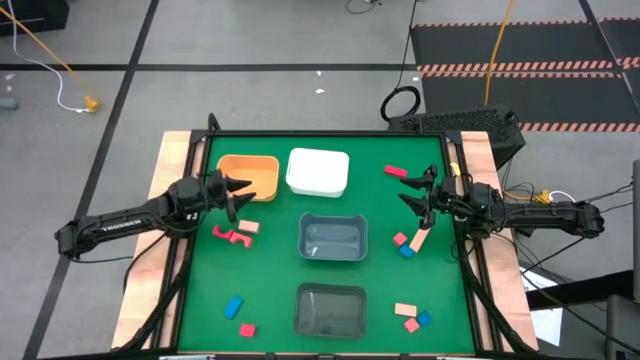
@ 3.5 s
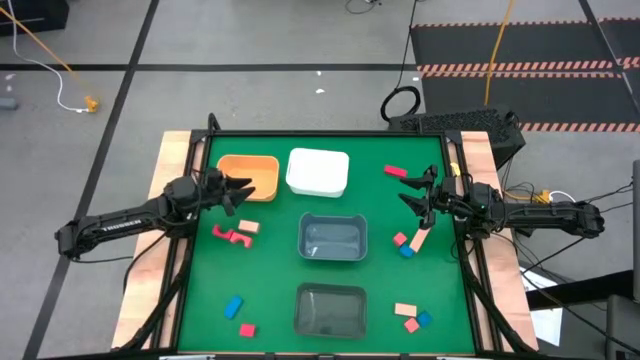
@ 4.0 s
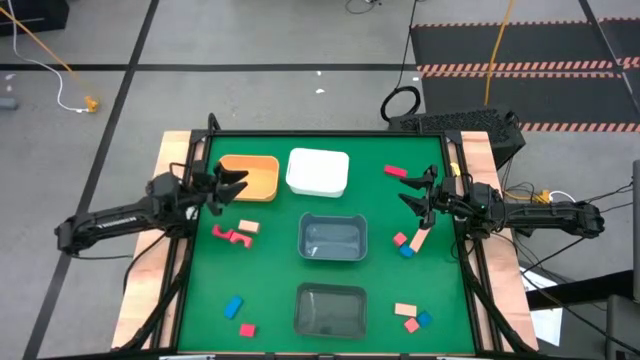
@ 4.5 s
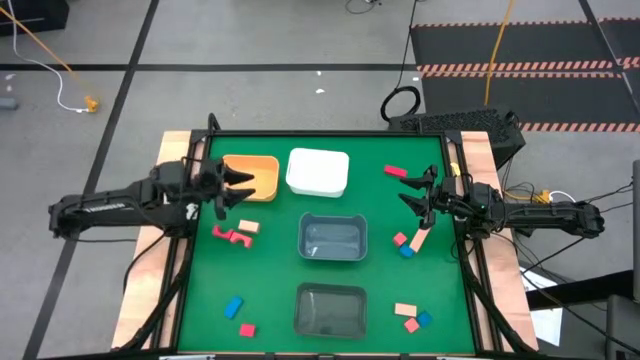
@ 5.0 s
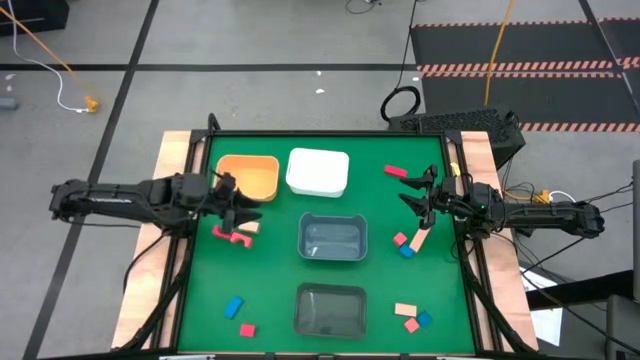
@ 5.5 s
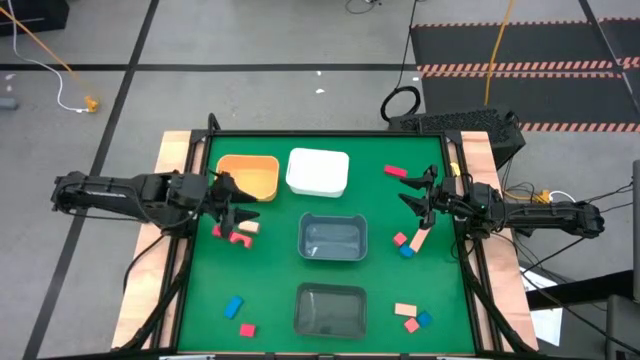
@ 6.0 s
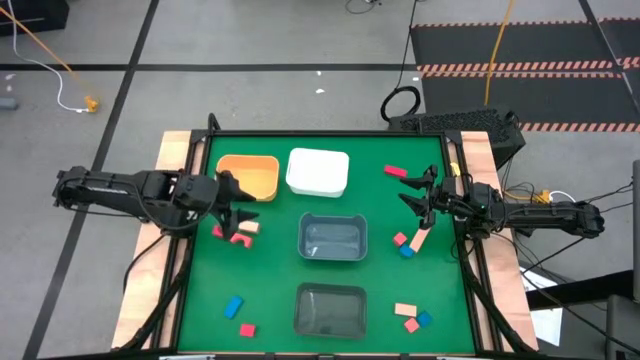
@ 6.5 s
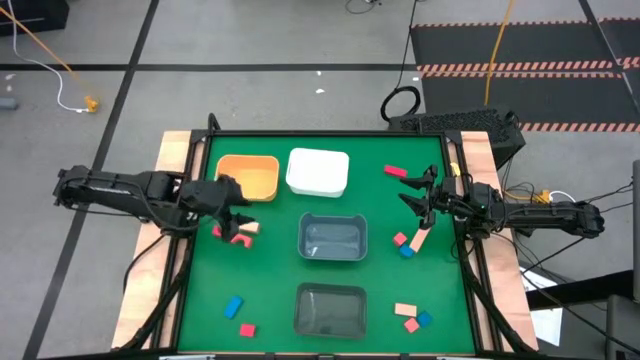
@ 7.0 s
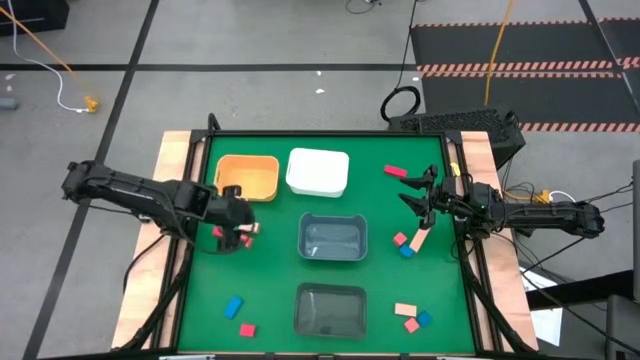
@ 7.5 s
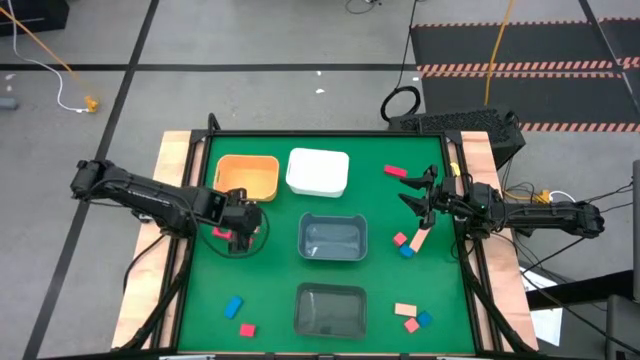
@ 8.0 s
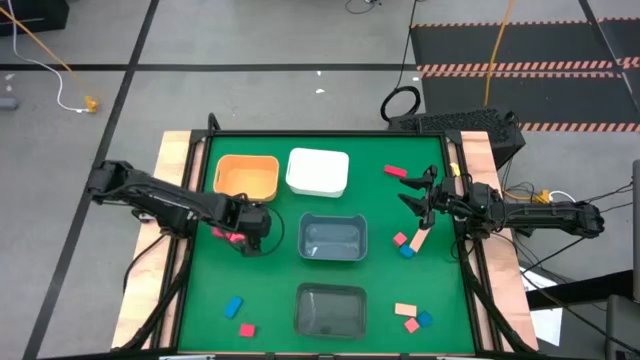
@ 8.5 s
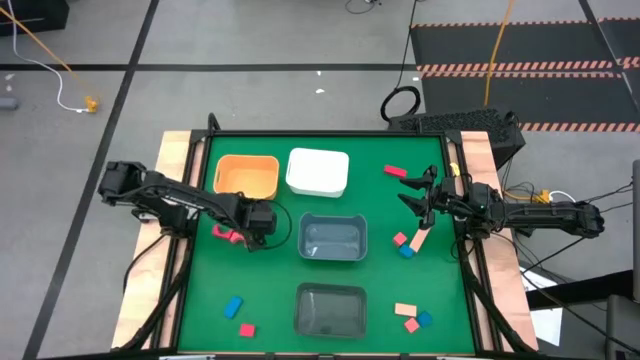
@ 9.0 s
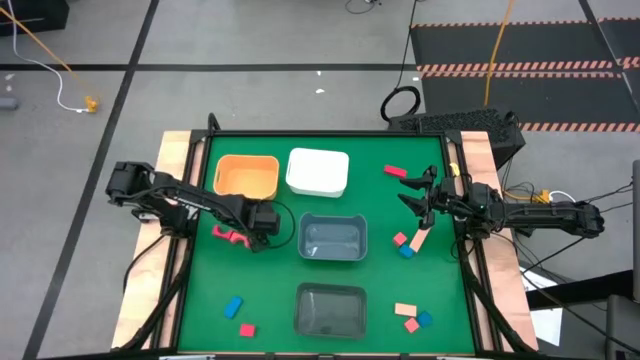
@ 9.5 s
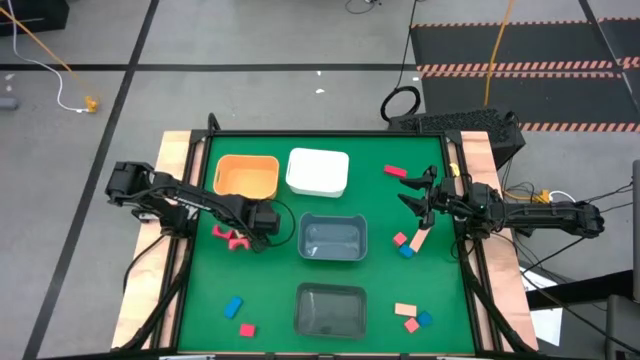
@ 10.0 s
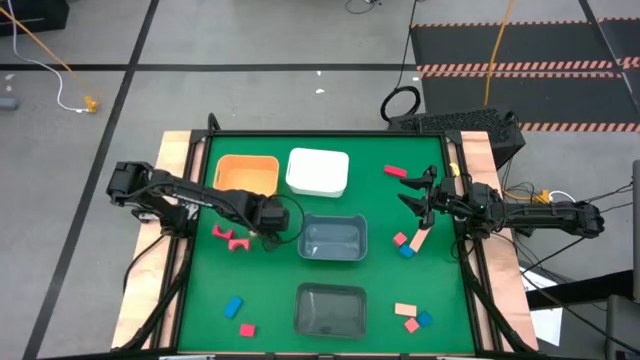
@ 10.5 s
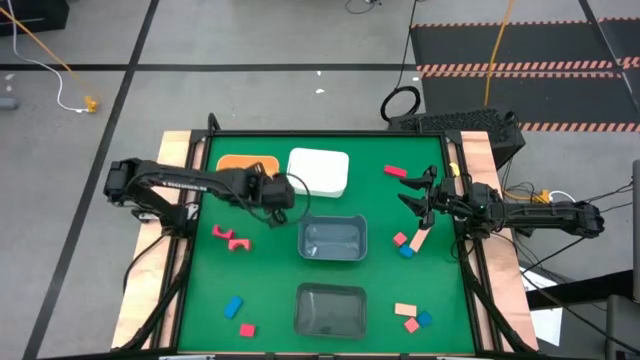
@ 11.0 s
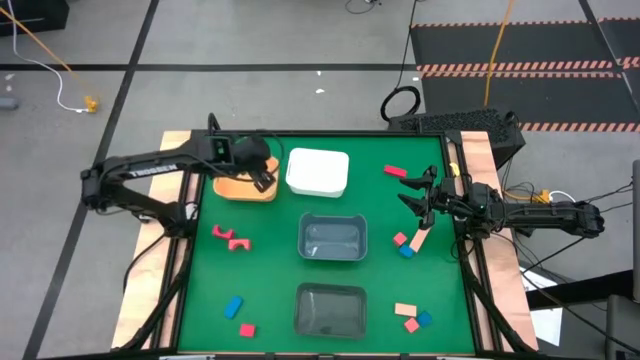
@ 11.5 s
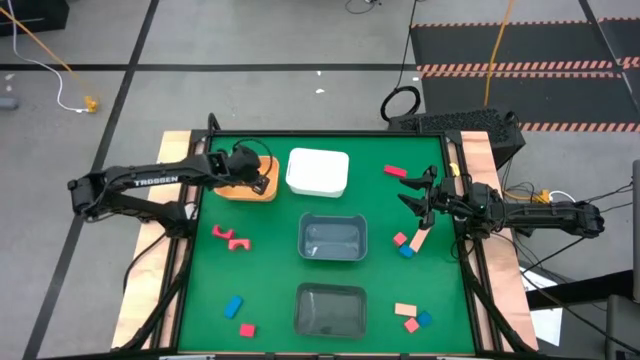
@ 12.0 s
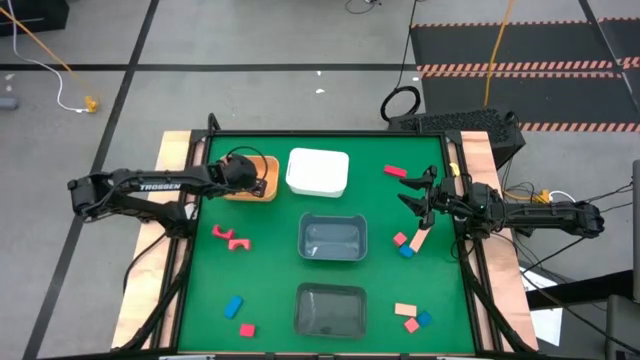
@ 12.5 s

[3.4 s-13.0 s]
Task: Sort & place blocks by color
Put the top left brown wooden block into the yellow bin

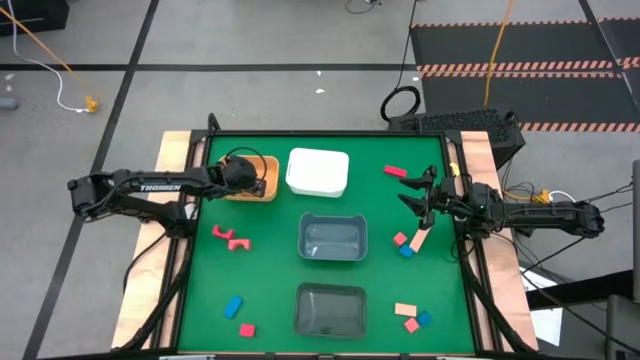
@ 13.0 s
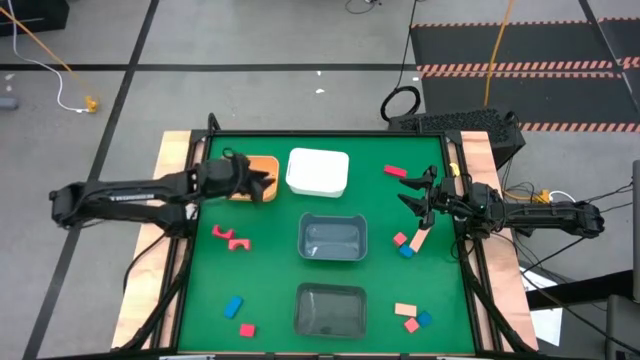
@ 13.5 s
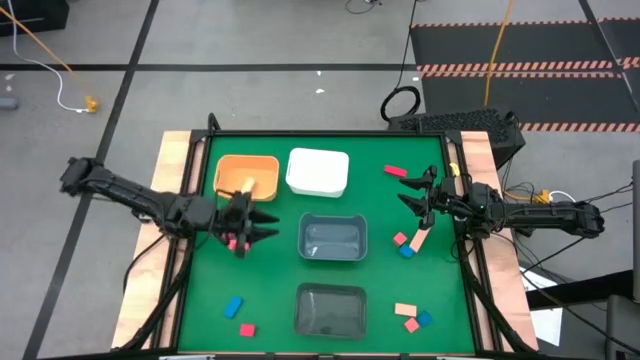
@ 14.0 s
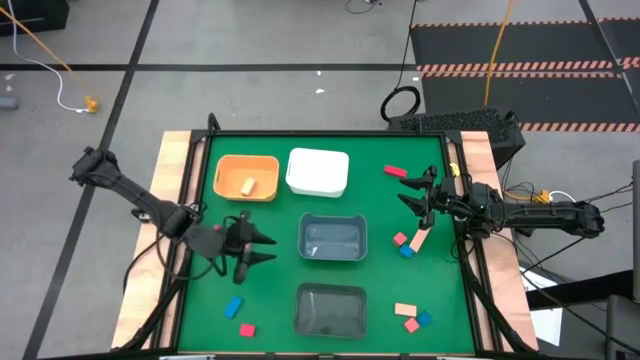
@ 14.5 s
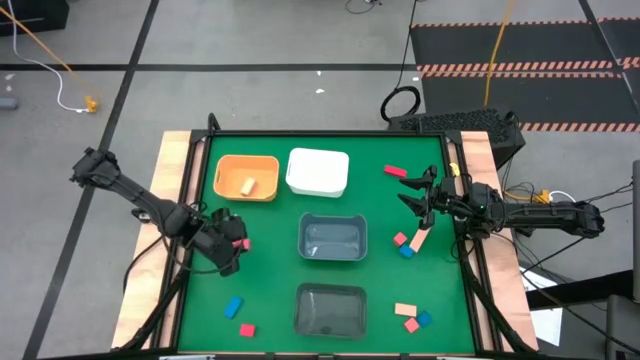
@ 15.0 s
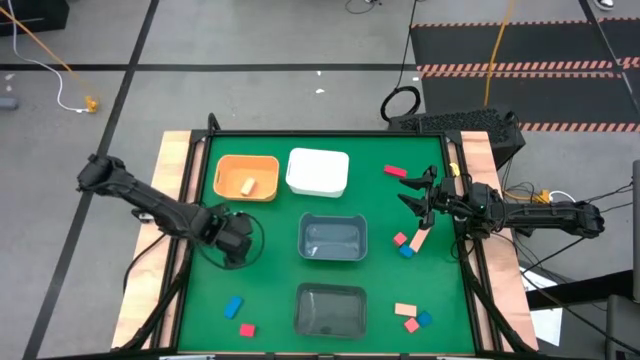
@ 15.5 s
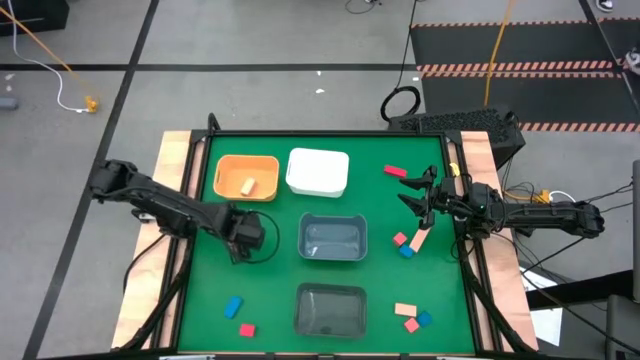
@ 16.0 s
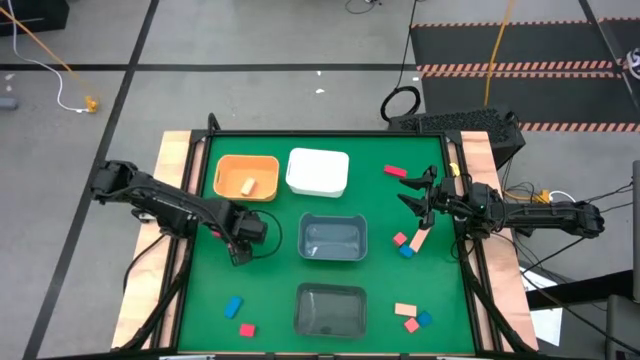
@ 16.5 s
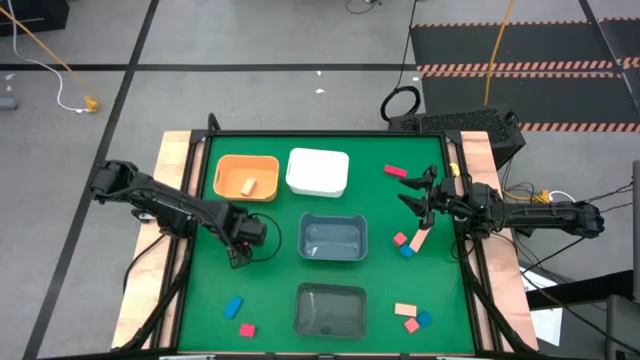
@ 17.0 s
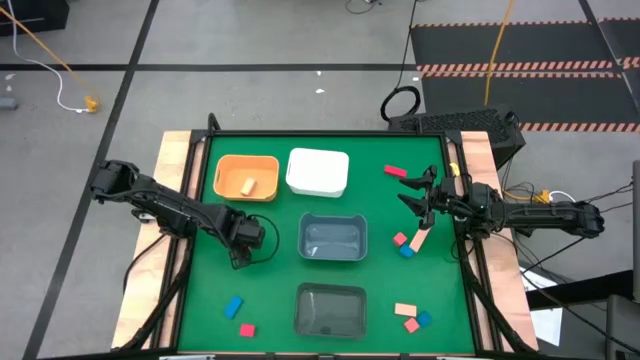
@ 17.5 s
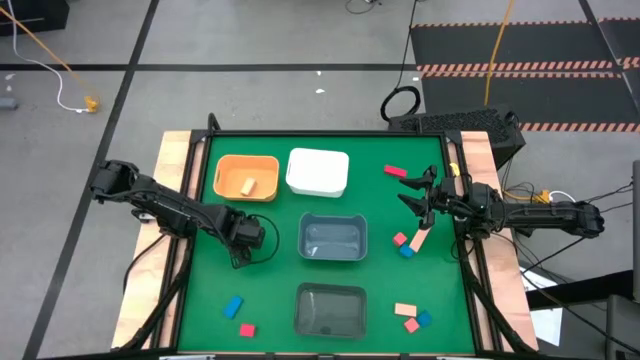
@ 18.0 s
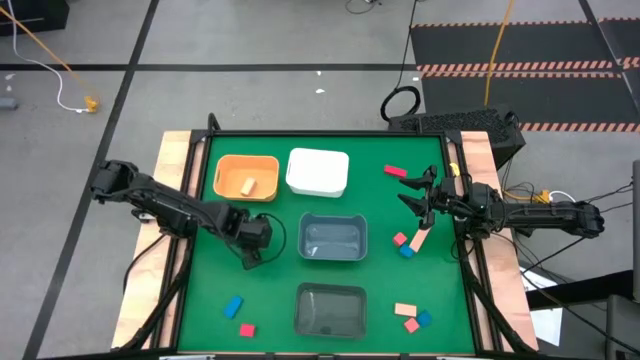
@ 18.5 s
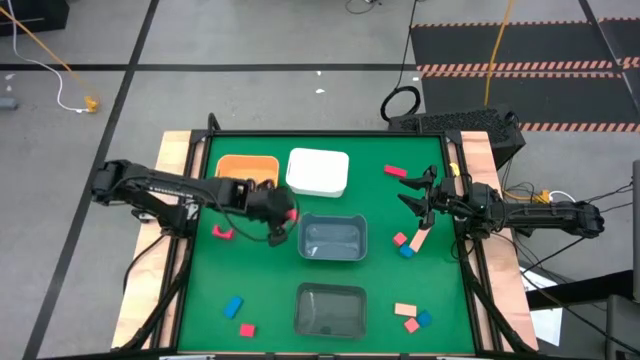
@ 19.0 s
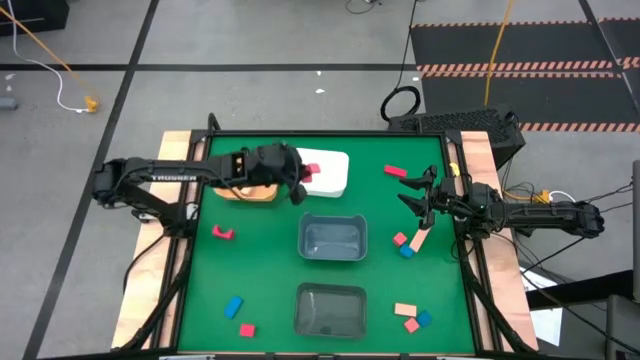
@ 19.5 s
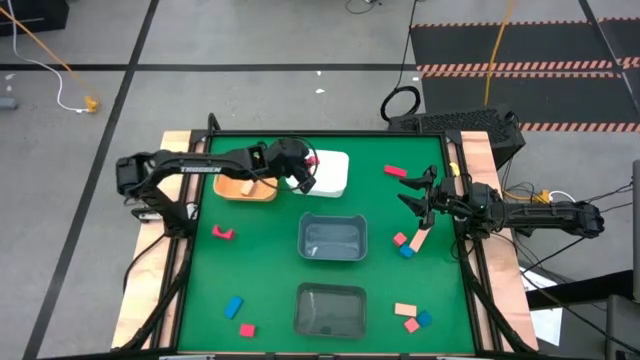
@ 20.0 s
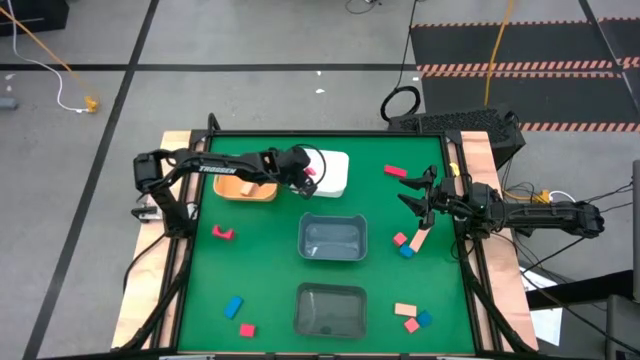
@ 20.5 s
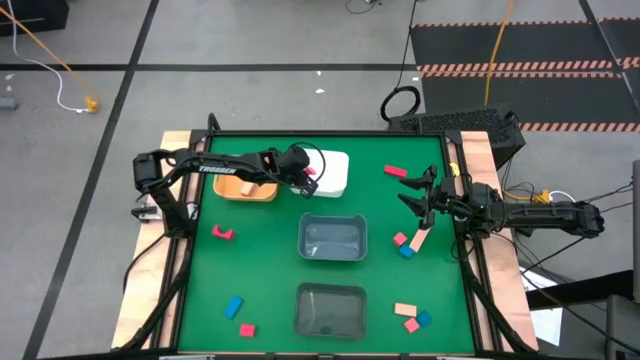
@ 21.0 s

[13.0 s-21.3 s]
Put the top left orange wooden block into the white bin

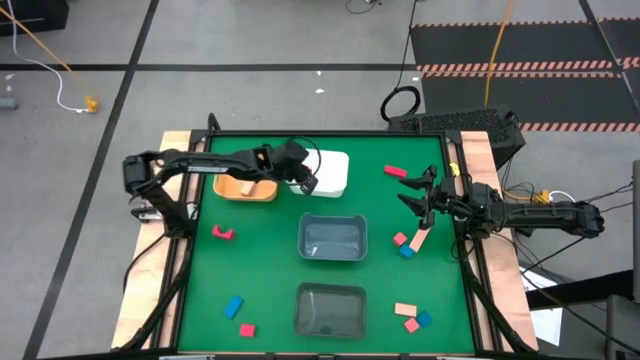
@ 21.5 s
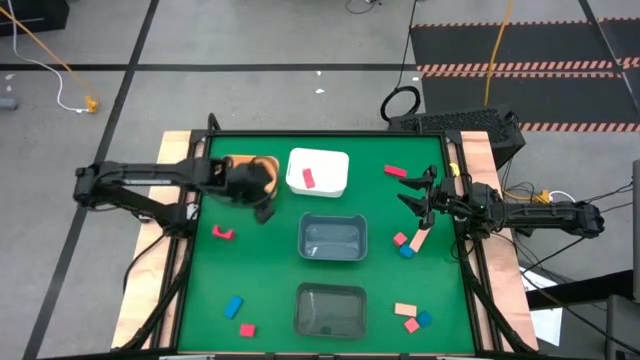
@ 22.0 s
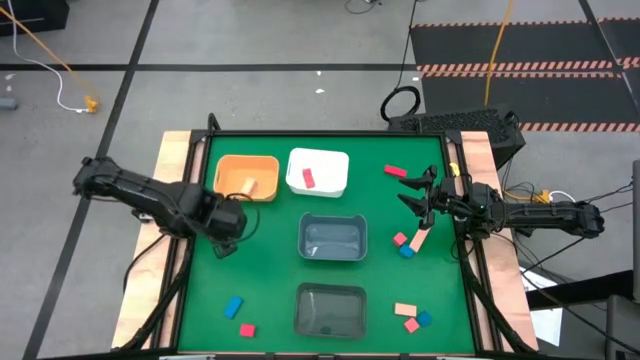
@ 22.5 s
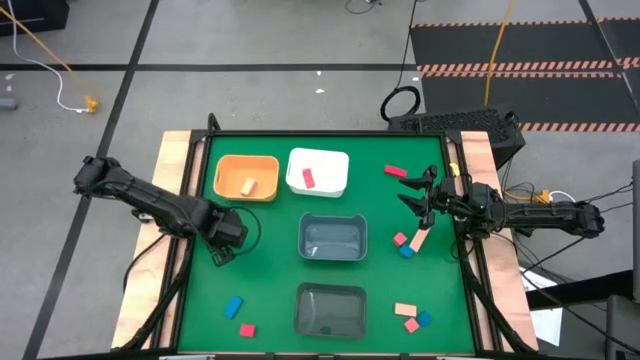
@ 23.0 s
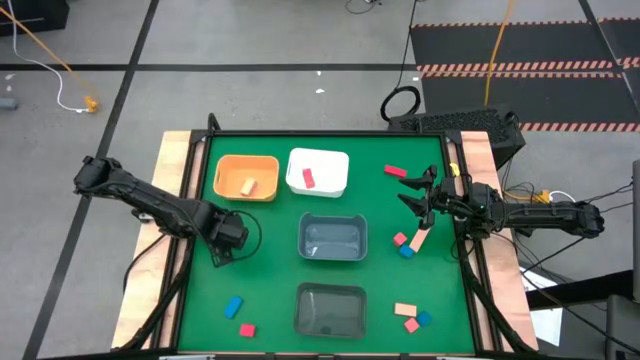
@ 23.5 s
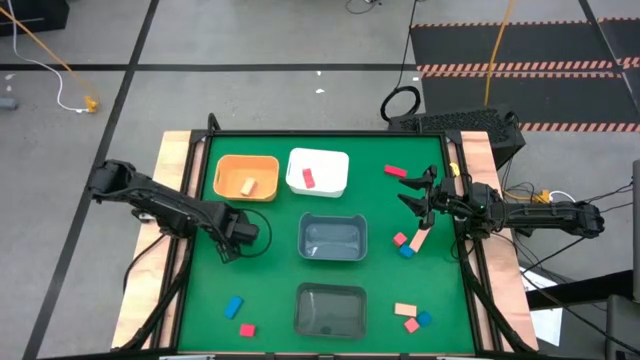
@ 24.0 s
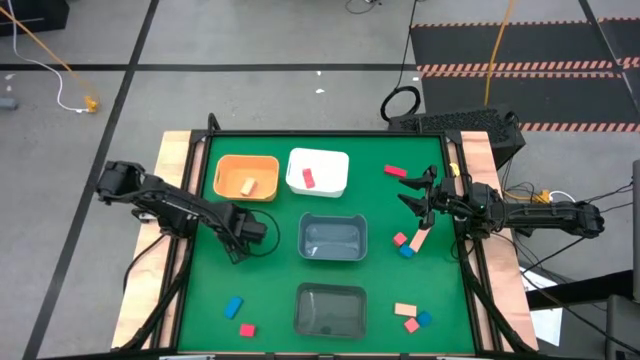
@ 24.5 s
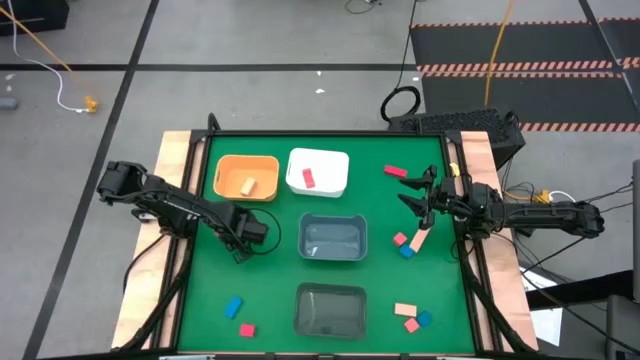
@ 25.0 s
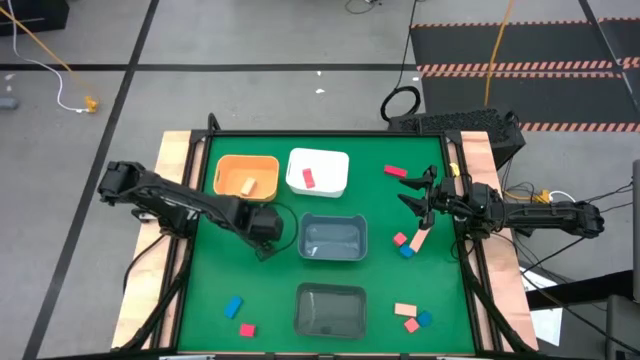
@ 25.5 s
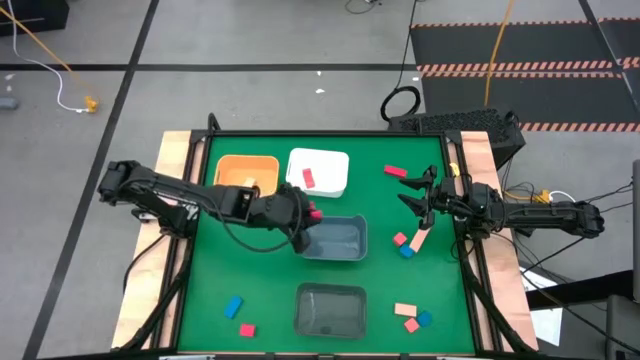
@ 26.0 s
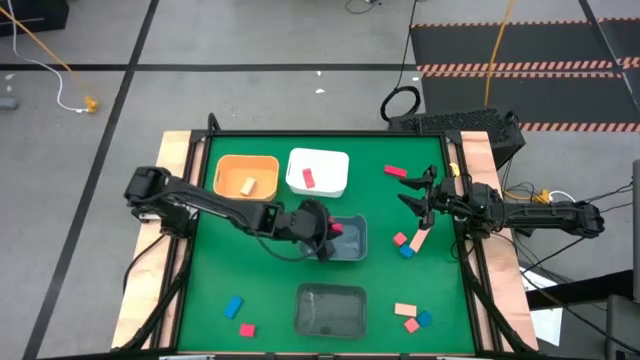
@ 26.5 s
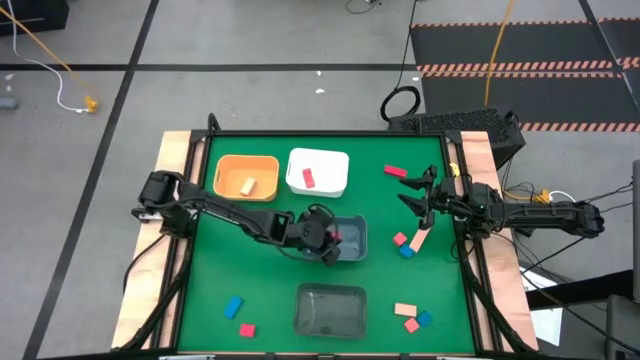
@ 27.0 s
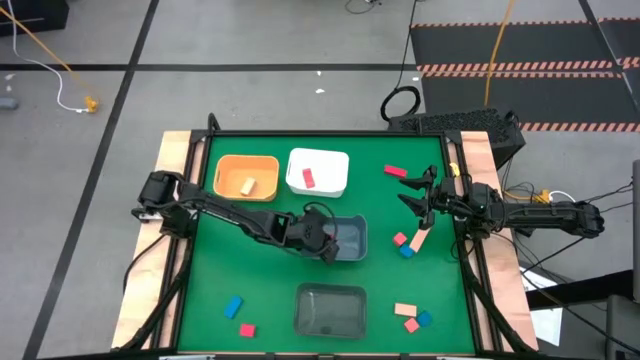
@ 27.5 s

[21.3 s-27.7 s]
Put the top left red wooden block into the blue bin
